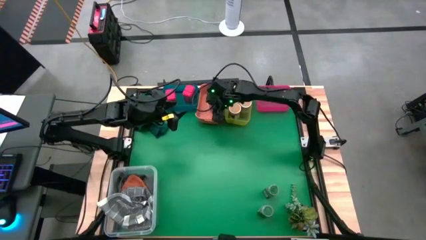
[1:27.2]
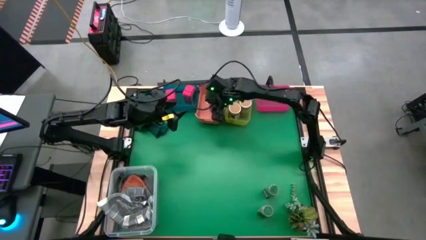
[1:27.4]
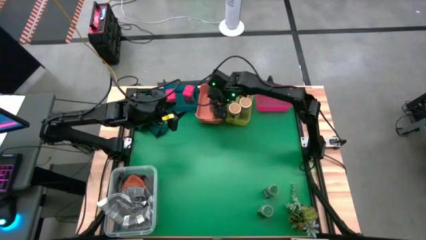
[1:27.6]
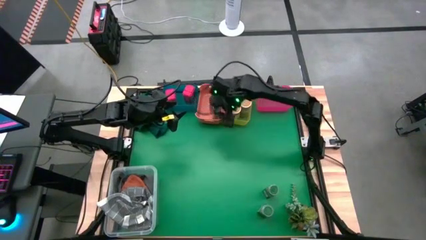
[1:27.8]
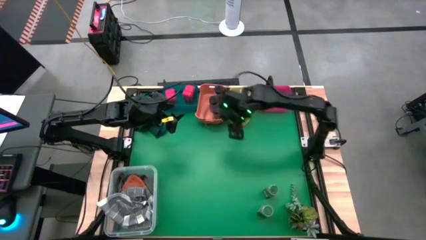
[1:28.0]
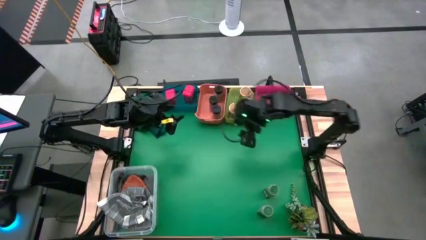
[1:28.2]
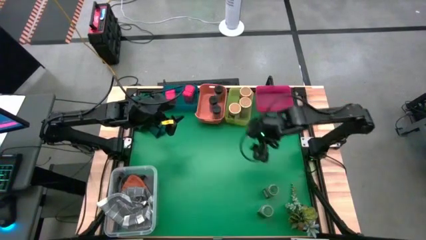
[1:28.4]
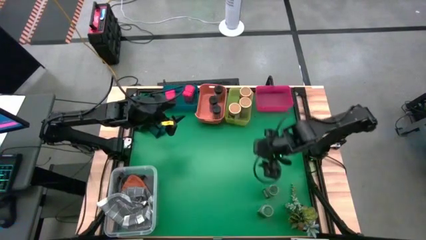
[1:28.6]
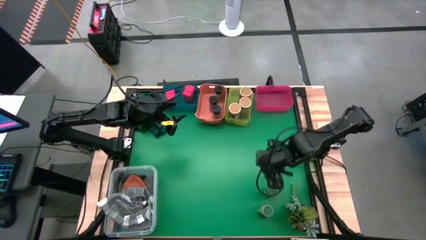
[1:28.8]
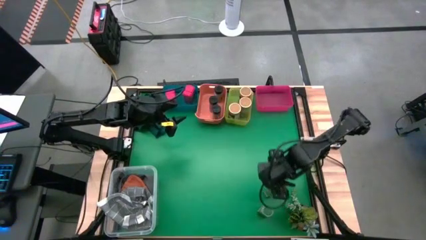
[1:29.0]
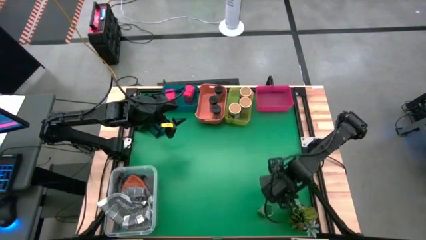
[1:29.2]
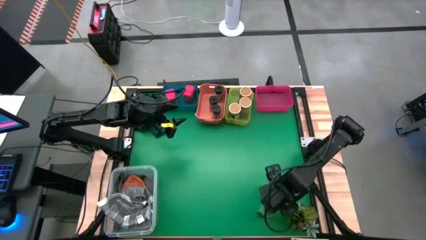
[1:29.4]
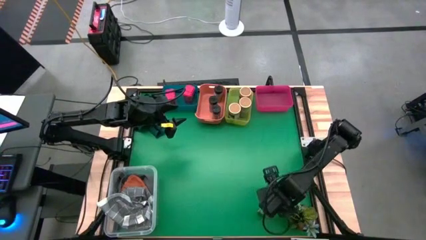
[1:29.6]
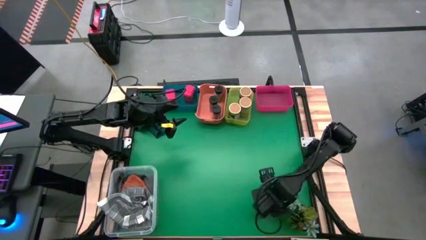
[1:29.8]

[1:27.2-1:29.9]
Task: Sort spices by type
Put the top green seasoning bottle into the red bin

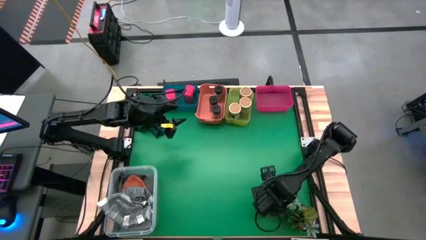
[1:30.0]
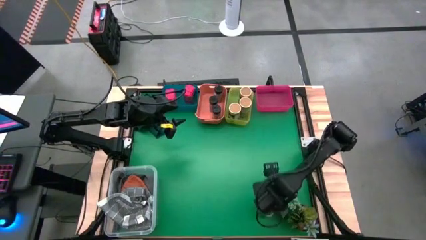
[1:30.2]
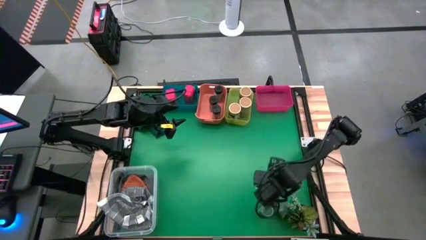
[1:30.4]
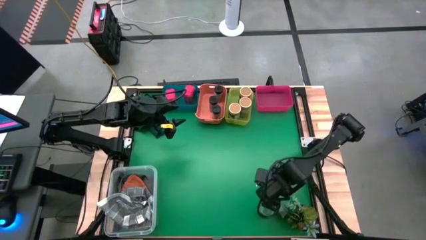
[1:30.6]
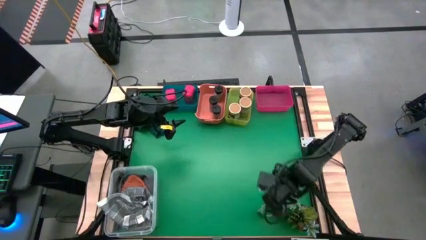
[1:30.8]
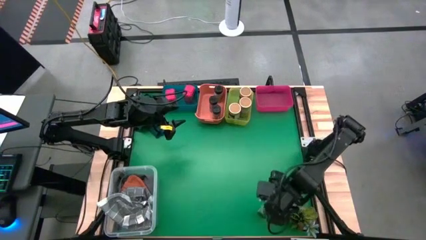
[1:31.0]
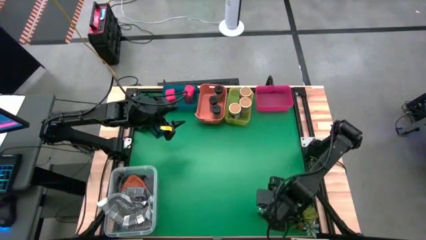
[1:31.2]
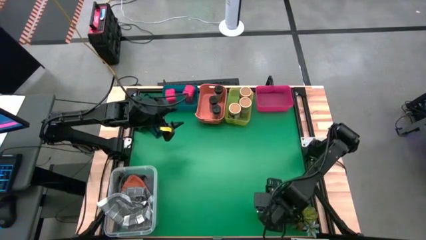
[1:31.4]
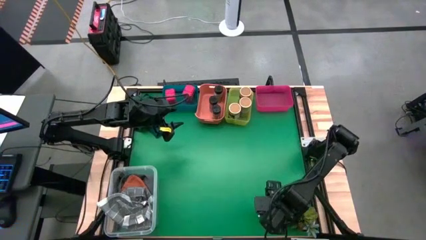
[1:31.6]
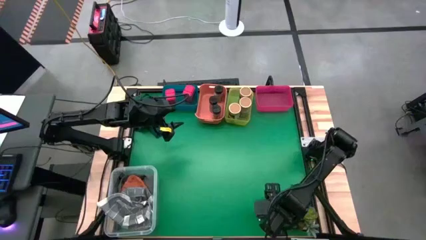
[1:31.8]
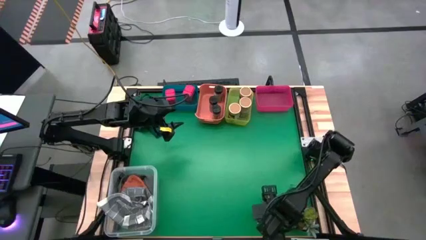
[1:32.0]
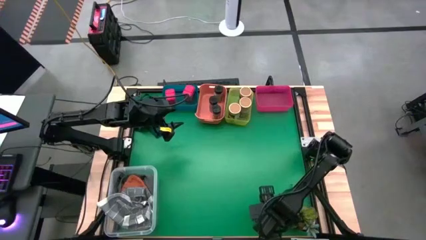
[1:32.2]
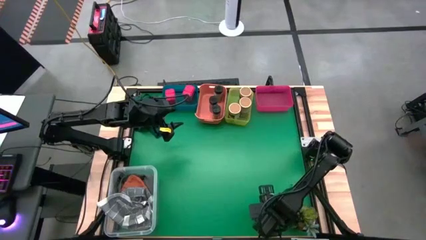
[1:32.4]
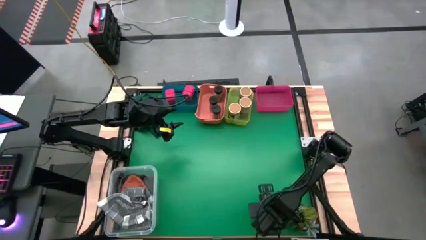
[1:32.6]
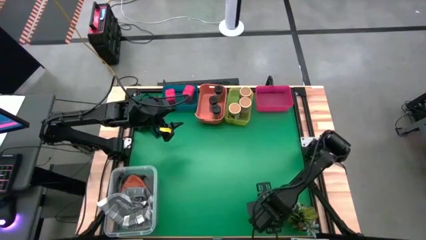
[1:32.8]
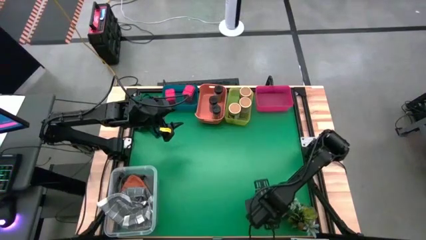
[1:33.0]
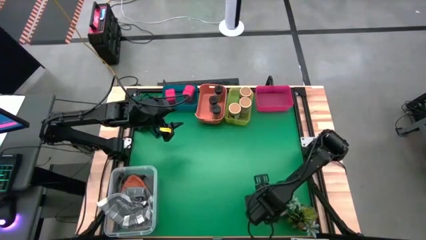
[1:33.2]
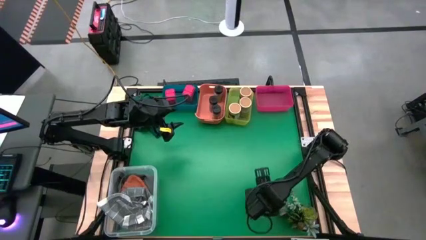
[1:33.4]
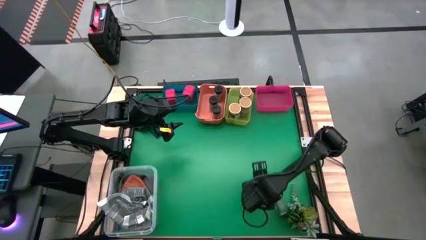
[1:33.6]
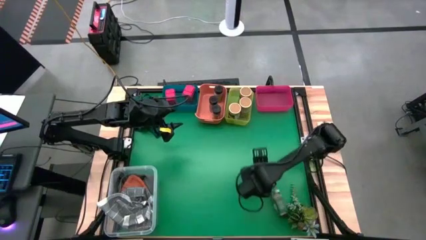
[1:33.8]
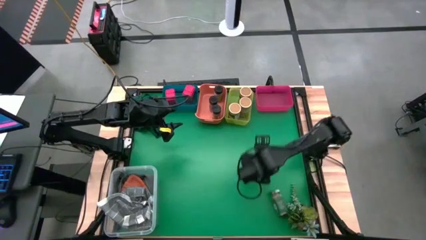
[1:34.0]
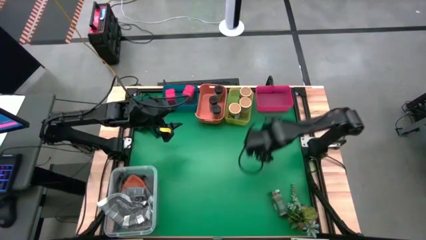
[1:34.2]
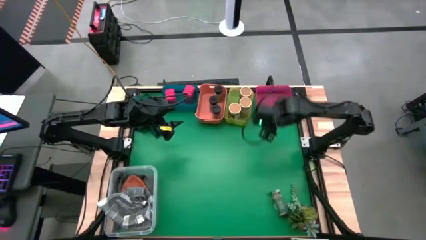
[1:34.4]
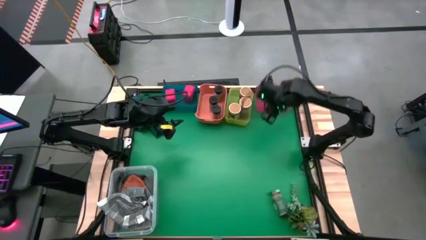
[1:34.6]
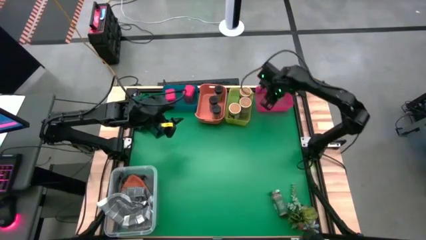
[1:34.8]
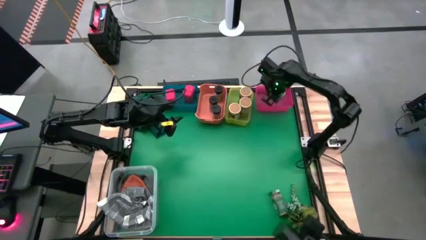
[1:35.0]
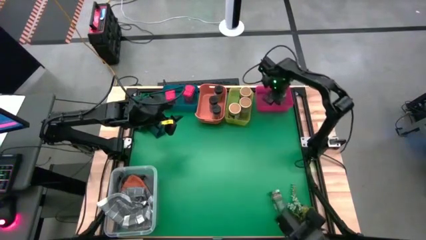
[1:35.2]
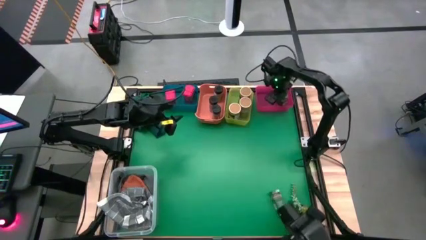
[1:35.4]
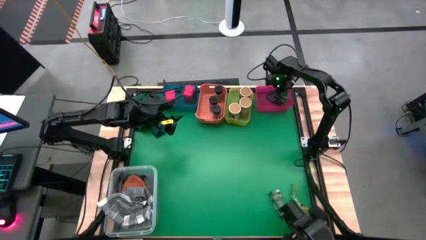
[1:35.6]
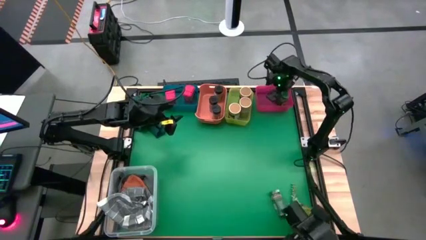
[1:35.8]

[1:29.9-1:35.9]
Put the bottom green seasoning bottle into the red bin

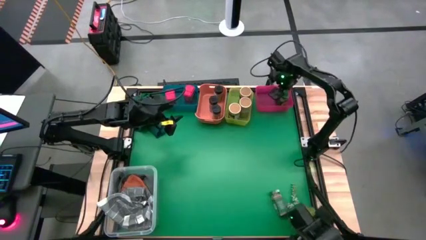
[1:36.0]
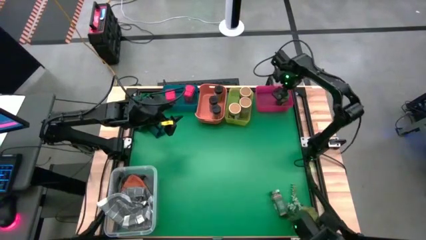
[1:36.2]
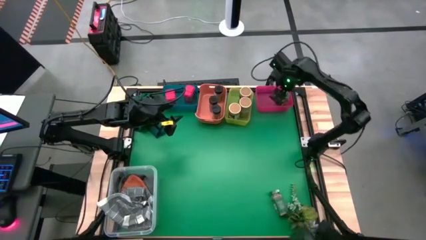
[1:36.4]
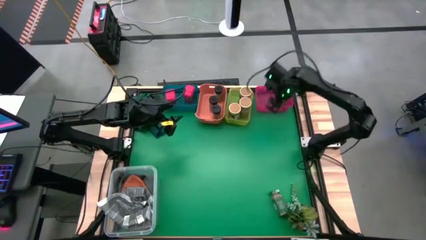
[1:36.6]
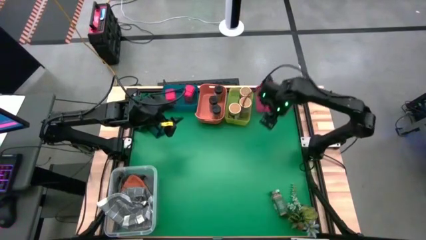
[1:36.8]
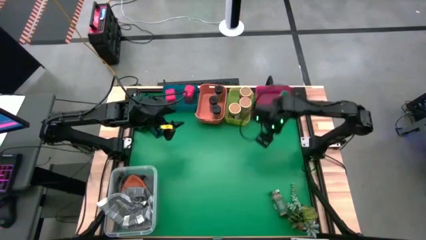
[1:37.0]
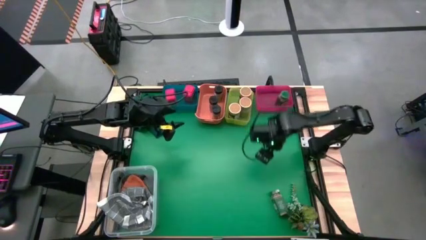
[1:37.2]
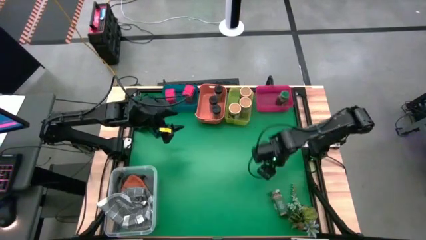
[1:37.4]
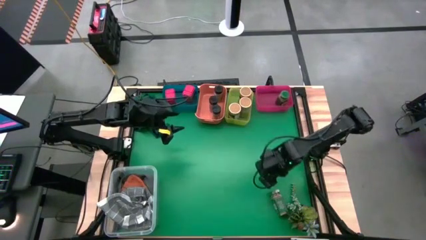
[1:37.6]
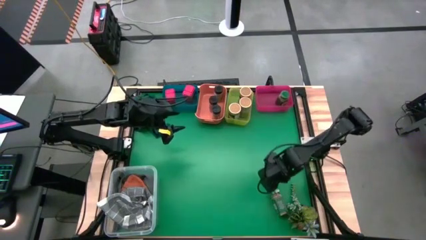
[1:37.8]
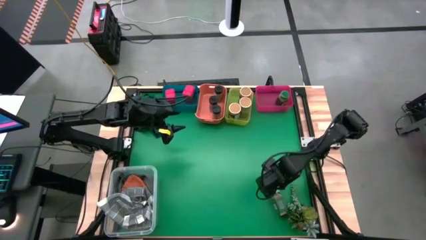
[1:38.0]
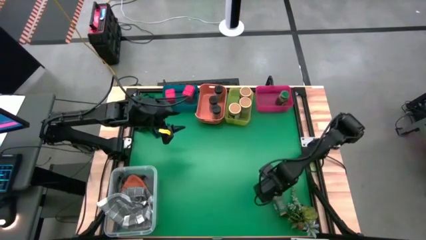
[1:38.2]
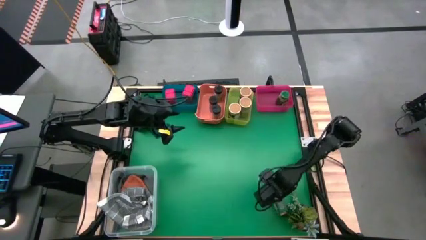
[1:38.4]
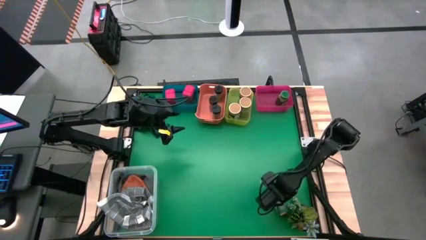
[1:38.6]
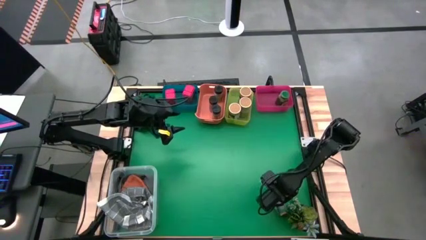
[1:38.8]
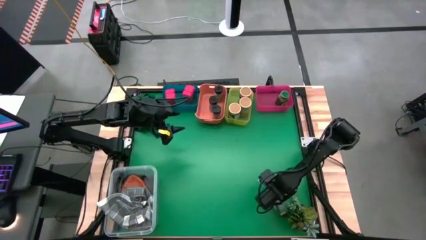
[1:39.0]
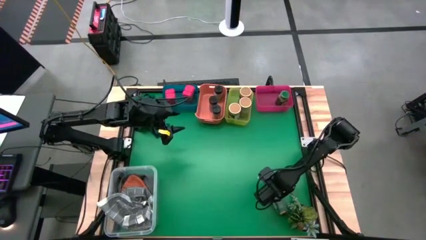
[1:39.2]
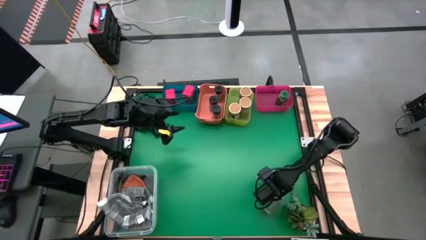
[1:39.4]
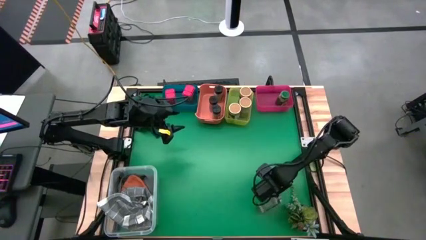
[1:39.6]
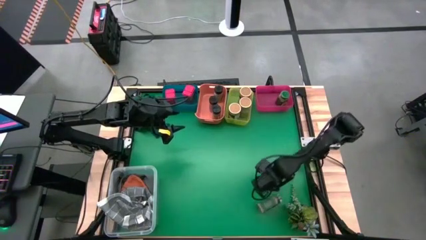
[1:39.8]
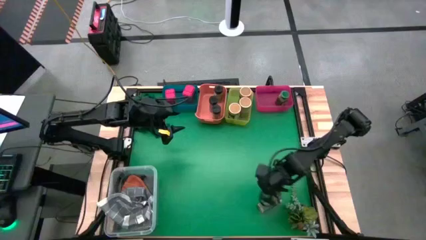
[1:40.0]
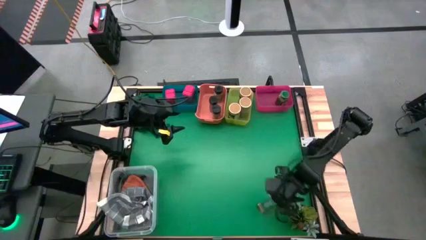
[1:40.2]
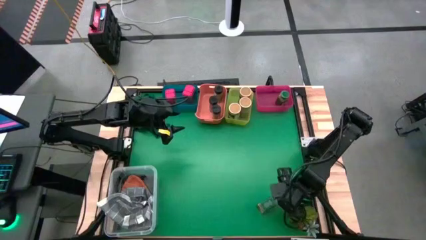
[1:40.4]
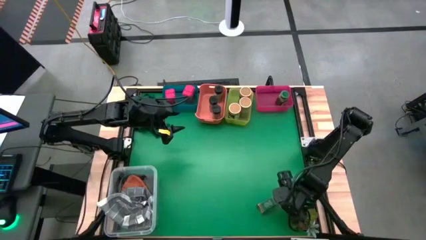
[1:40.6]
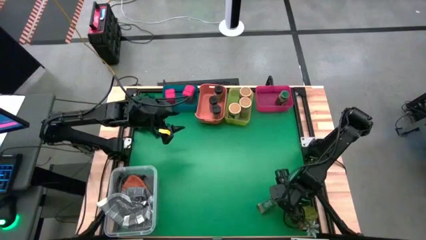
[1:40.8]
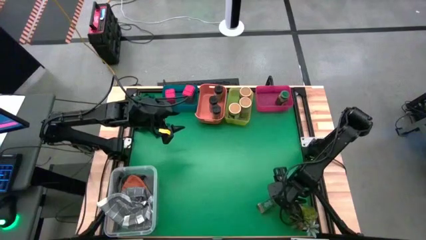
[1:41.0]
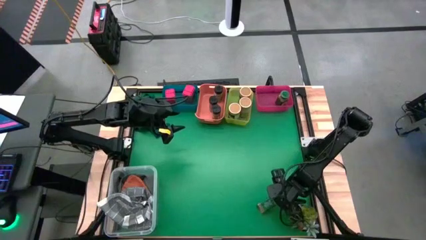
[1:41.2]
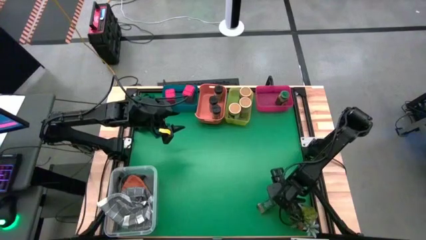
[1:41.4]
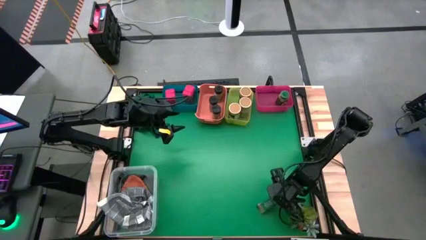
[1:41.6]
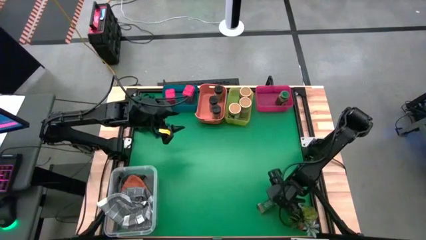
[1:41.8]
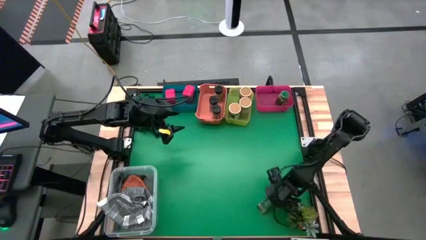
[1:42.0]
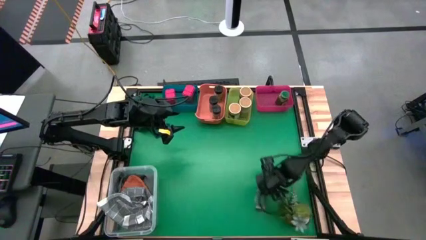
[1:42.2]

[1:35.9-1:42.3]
Put the green seasoning bottle into the red bin
